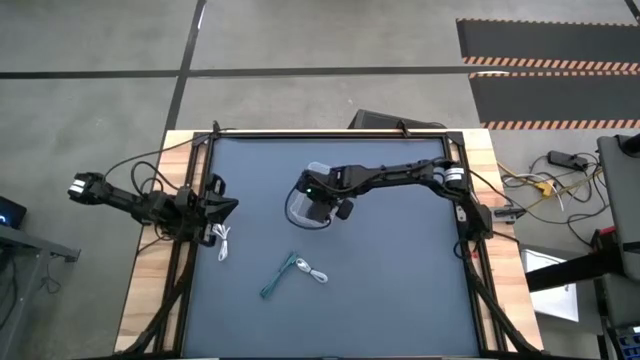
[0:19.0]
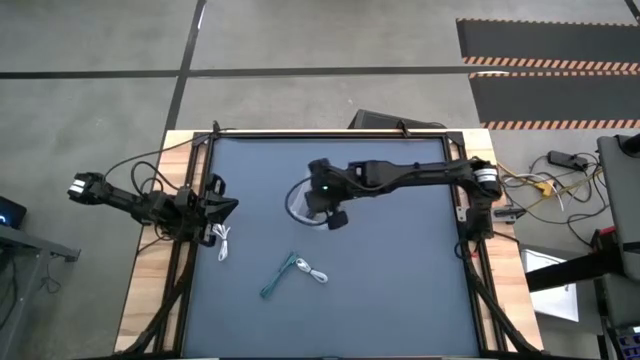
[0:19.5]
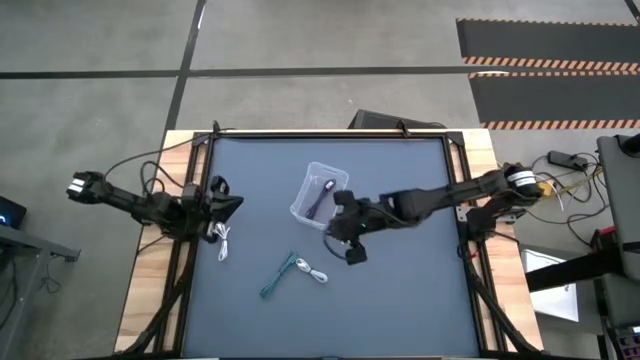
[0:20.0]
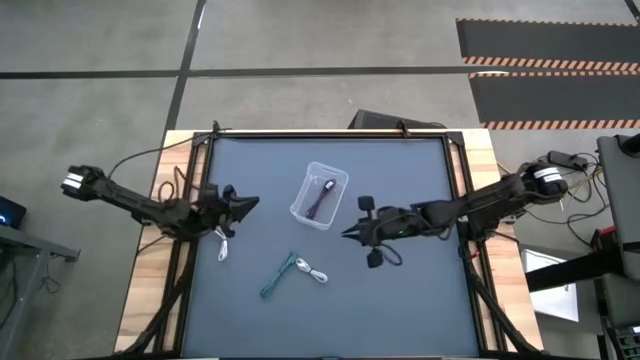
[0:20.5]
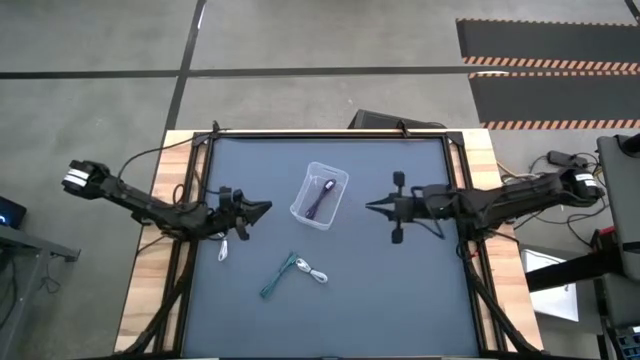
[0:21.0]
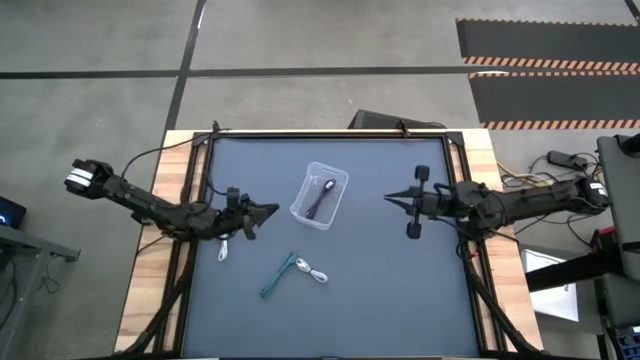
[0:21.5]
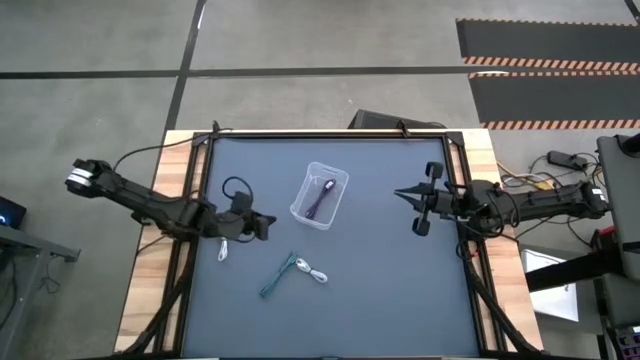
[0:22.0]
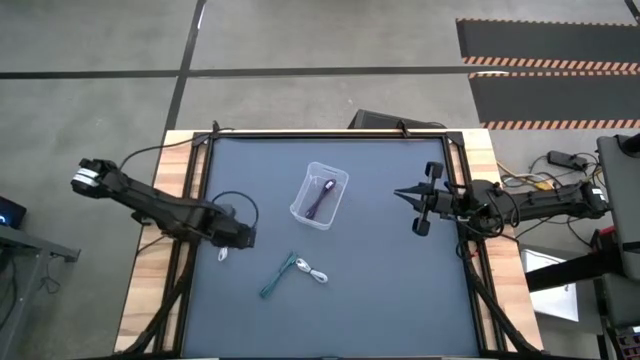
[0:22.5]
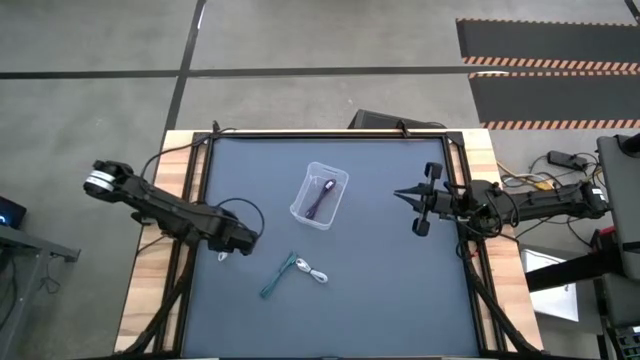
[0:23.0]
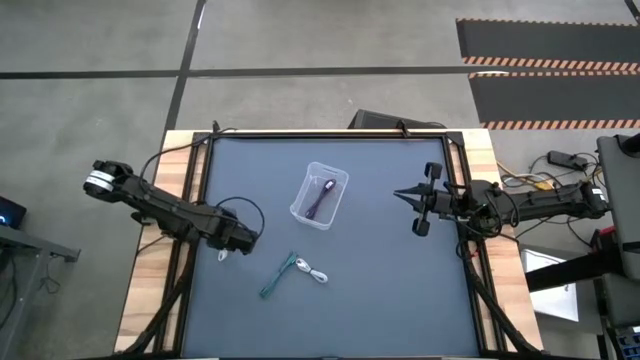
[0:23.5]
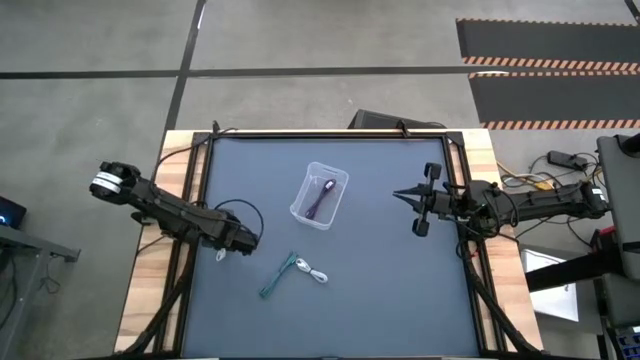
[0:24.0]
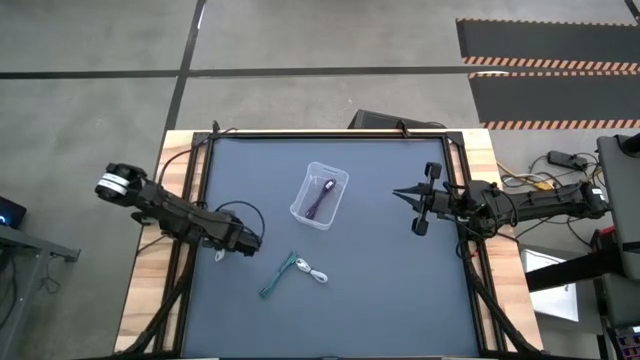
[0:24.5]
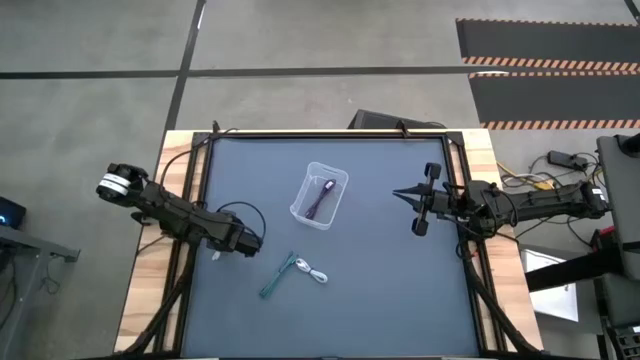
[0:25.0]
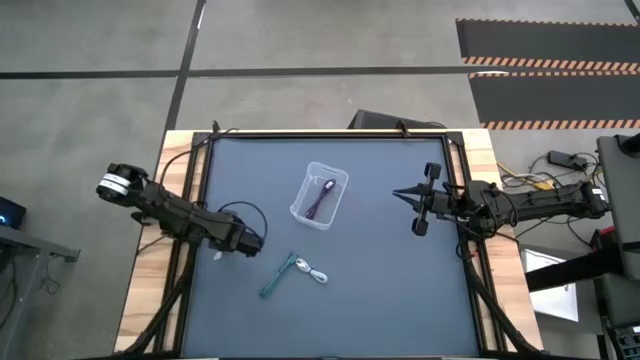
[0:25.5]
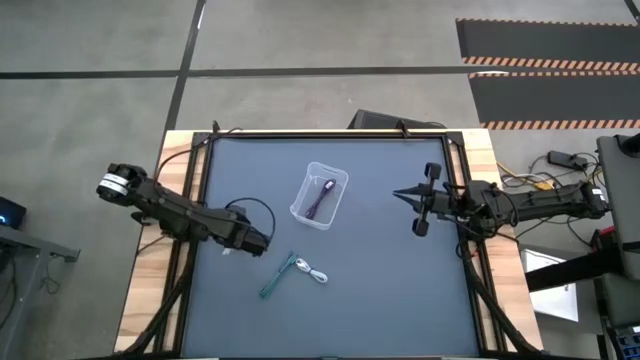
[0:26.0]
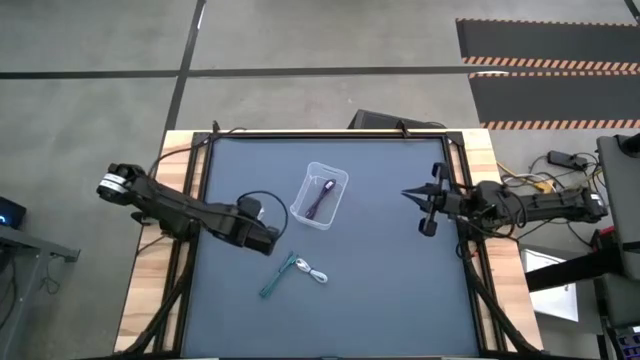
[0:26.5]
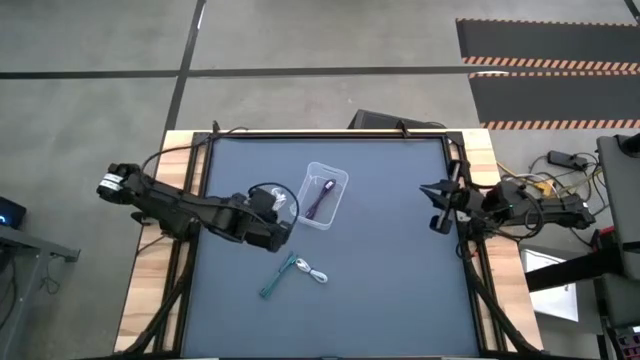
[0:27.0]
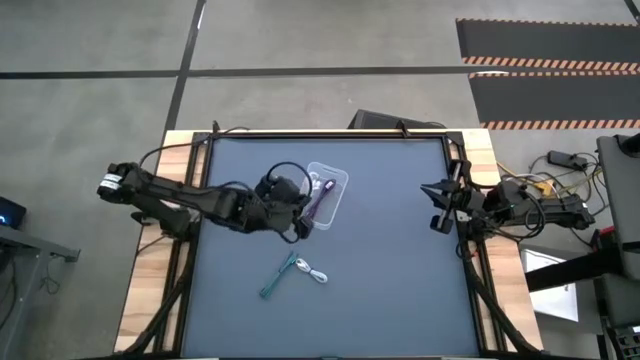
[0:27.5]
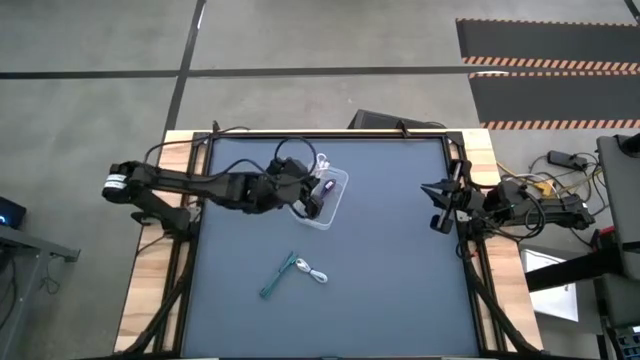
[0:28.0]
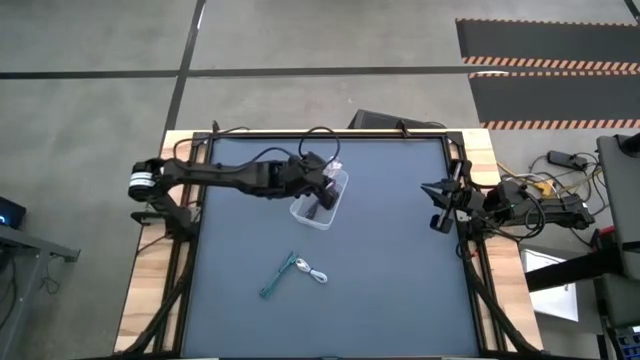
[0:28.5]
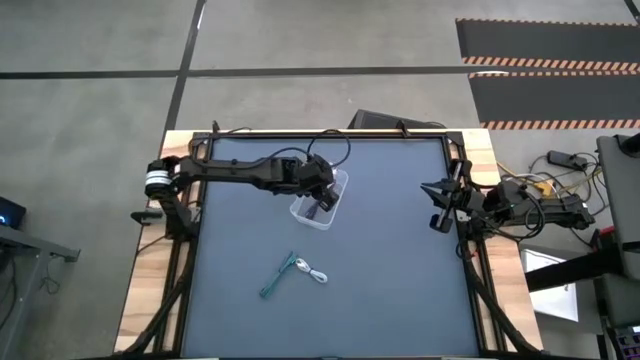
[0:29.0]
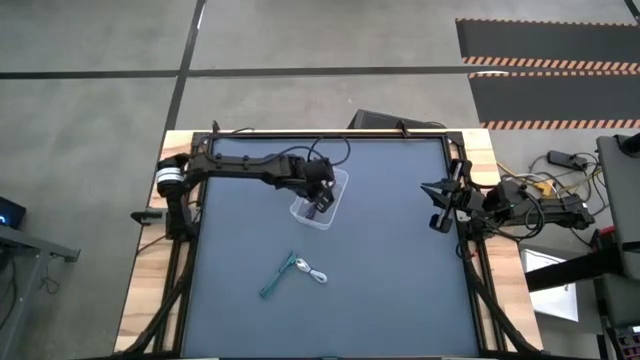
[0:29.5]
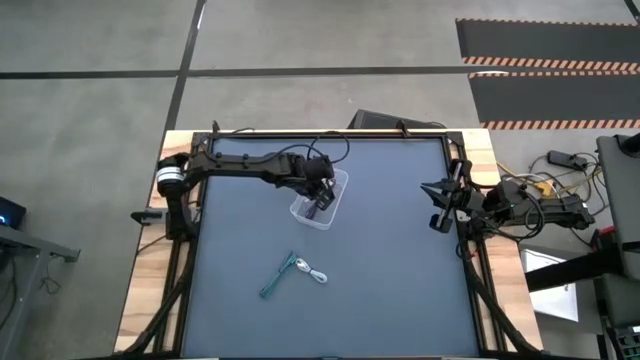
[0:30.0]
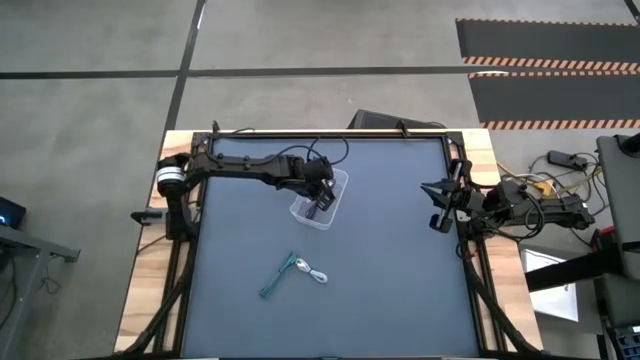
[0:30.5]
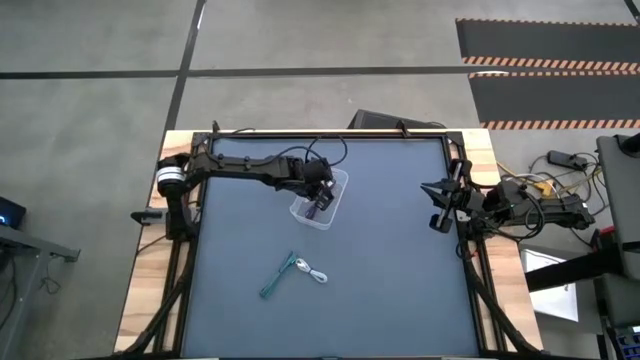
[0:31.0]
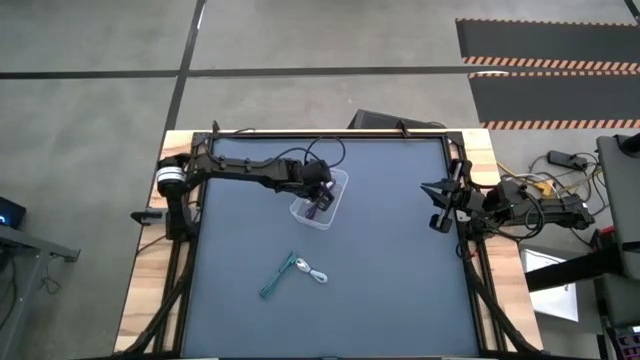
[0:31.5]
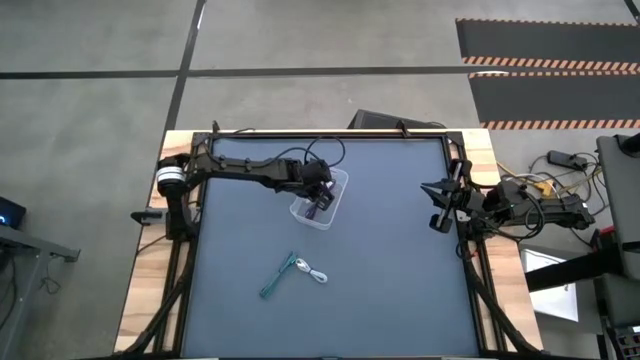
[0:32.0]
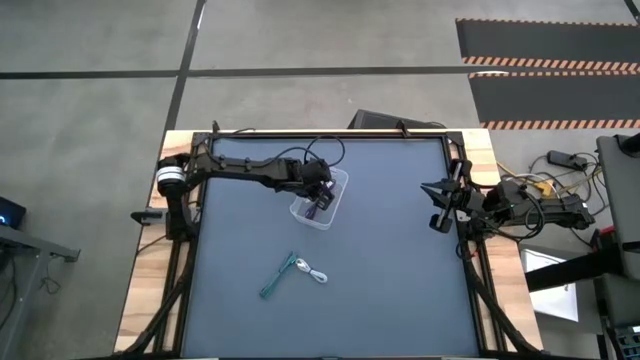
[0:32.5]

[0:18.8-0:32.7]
Task: Pick and place USB-C Cables
Put the top white USB cable into the transparent bin

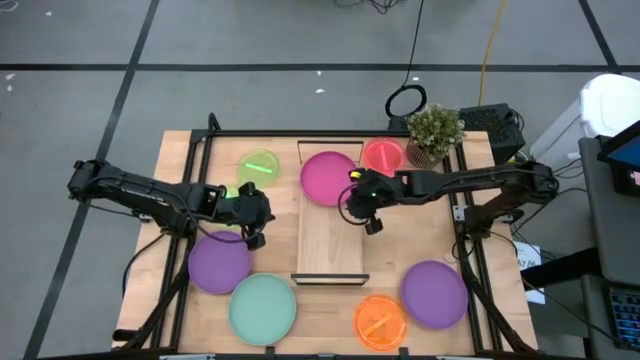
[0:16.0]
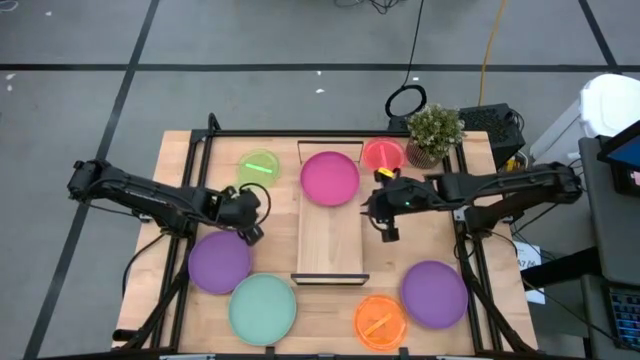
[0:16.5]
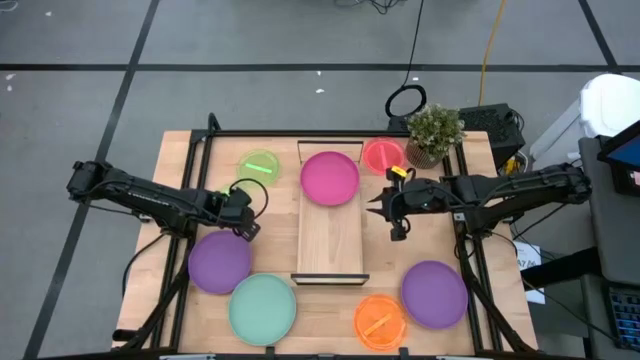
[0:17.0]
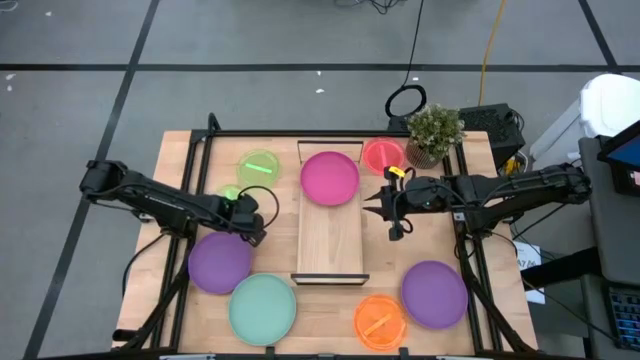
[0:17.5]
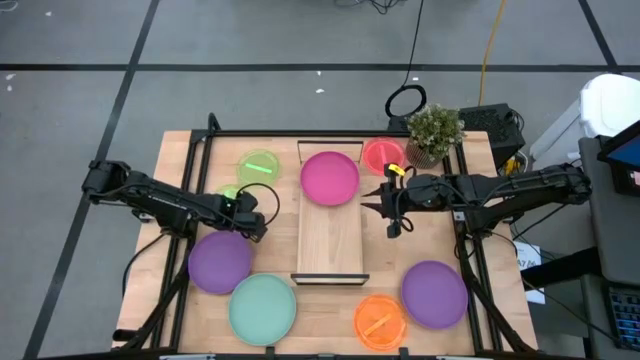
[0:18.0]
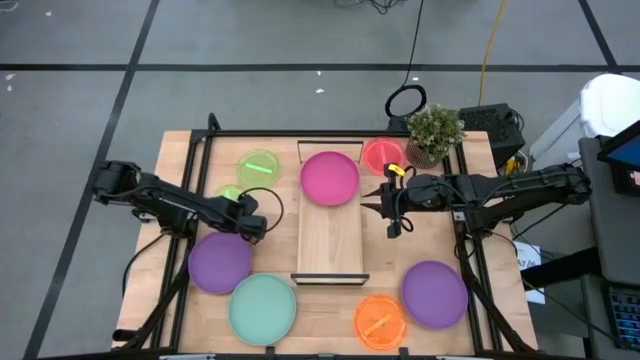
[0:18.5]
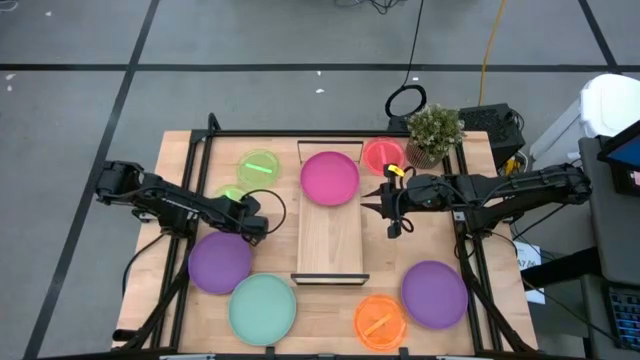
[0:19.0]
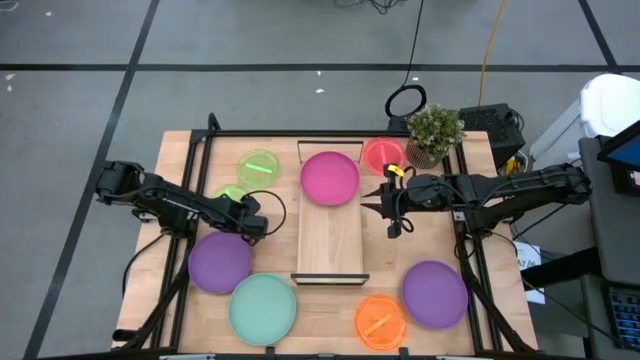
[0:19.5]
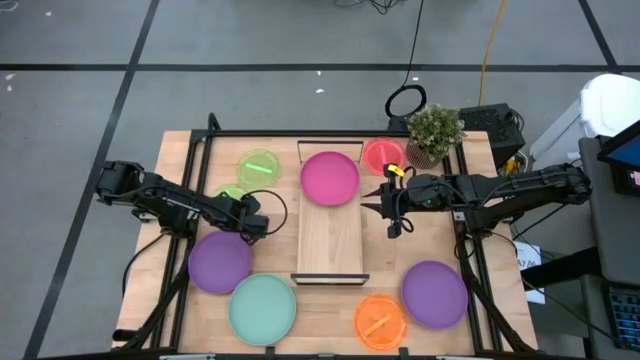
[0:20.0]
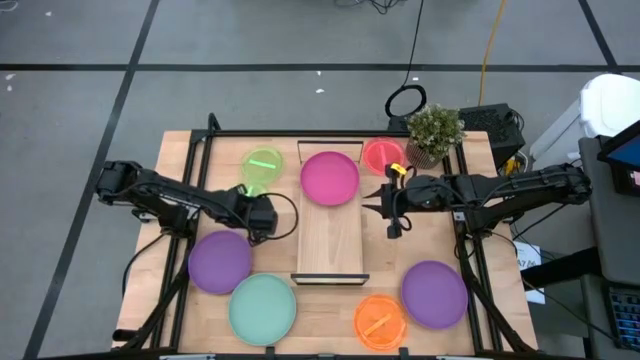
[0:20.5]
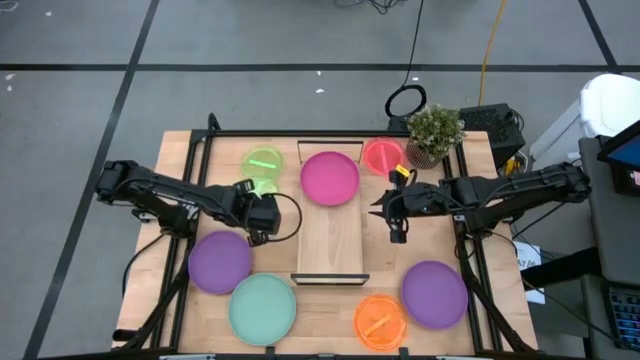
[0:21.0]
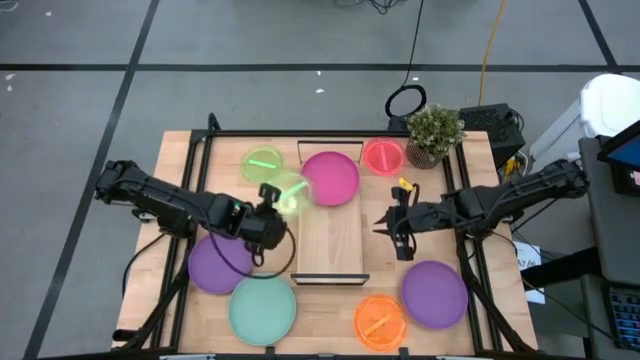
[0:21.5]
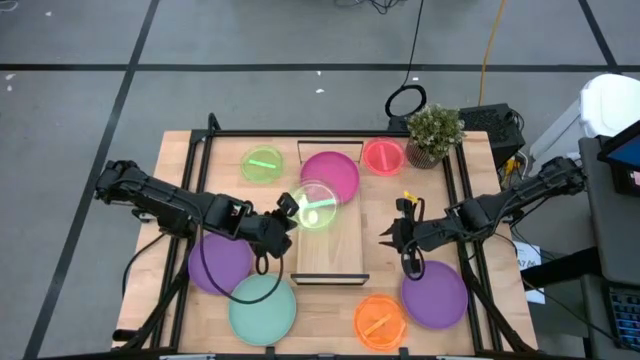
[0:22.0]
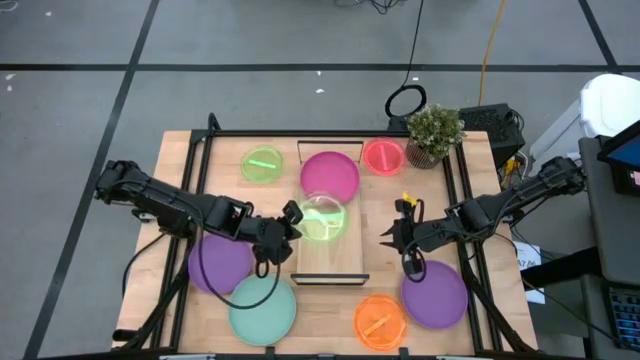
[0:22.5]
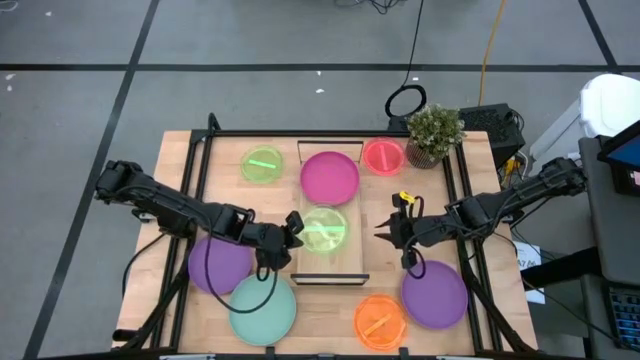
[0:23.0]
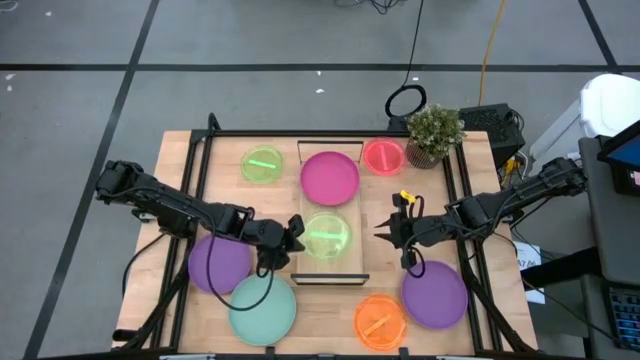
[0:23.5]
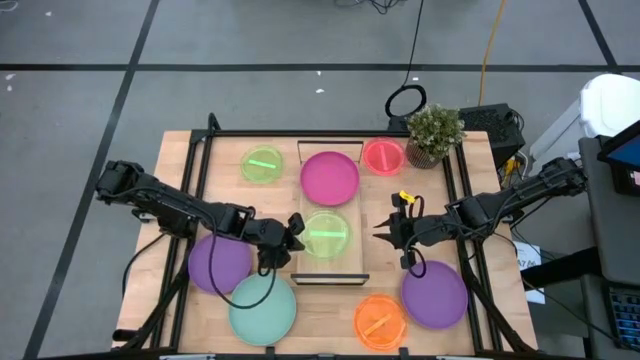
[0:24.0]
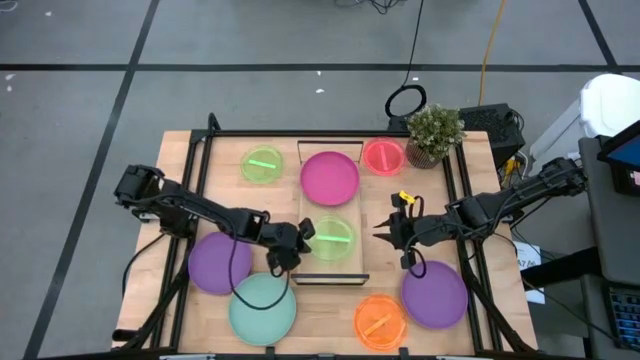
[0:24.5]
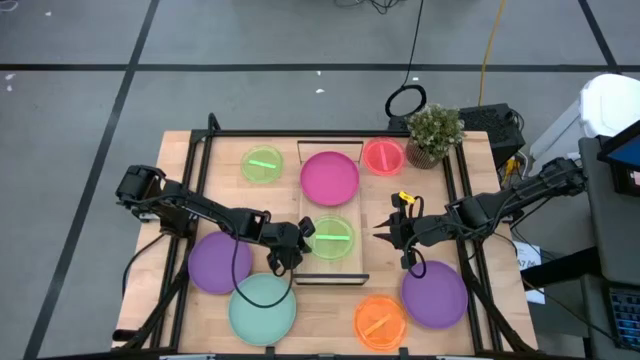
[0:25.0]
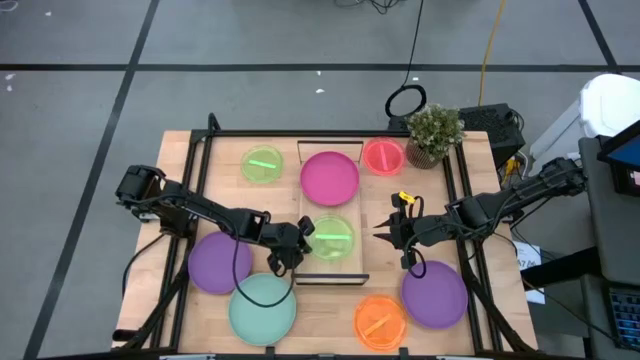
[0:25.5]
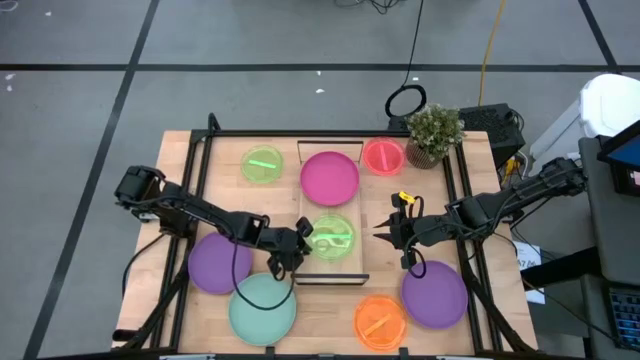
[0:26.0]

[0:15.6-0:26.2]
Task: Place and stack plates onto a shelf
Put the bottom green plate on the shelf
